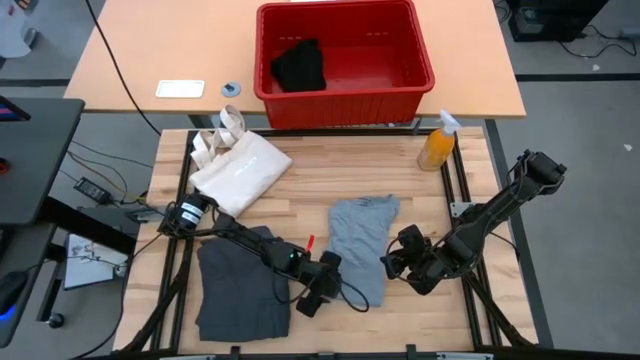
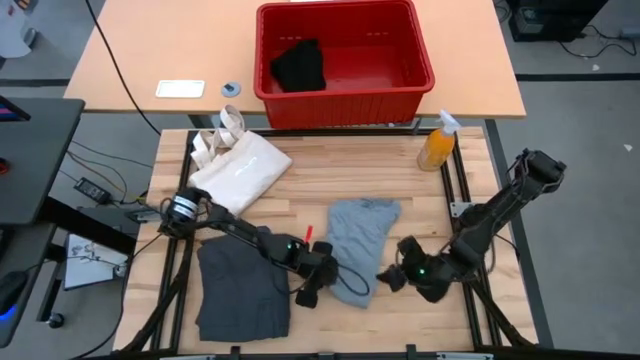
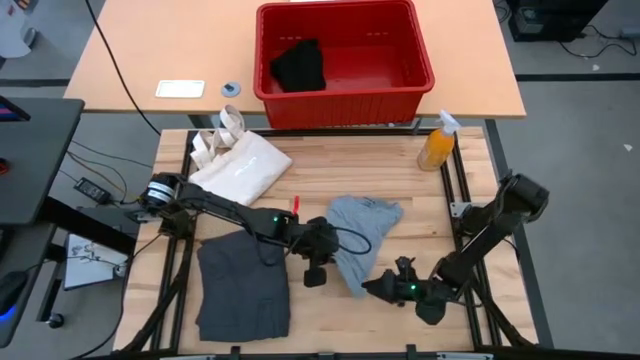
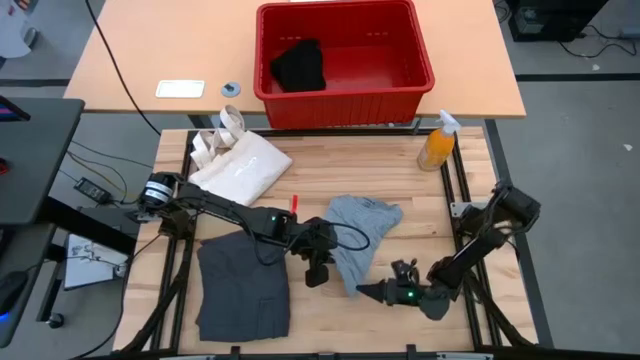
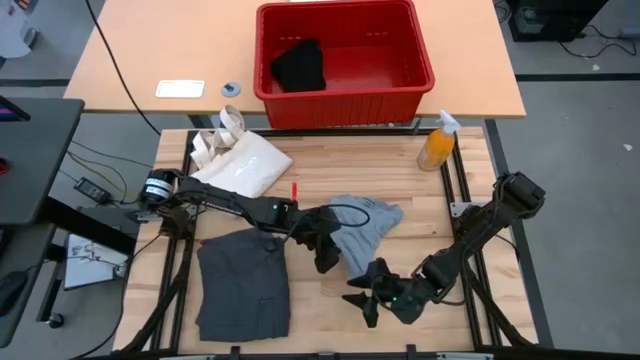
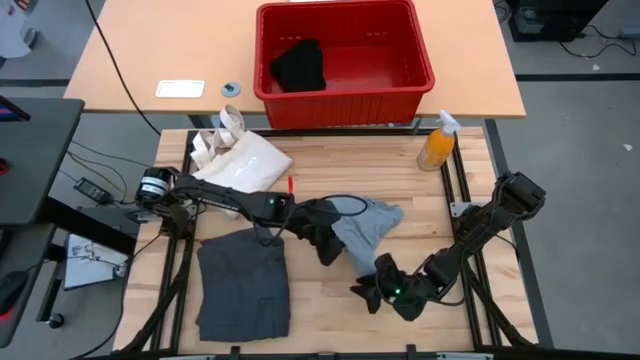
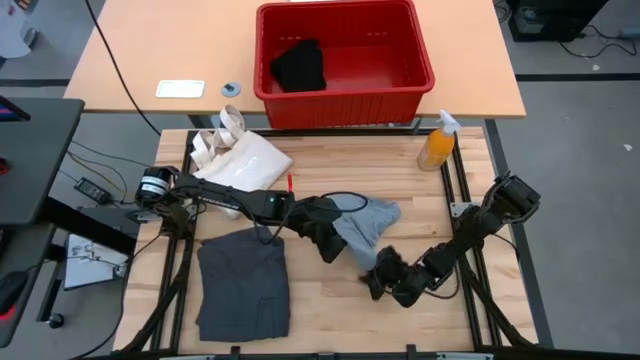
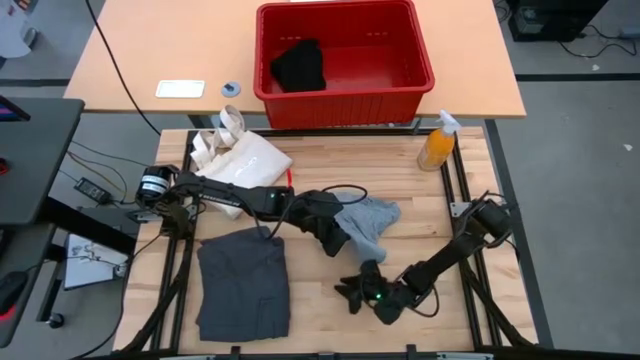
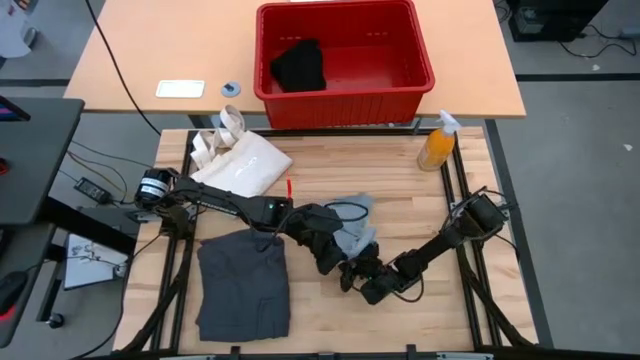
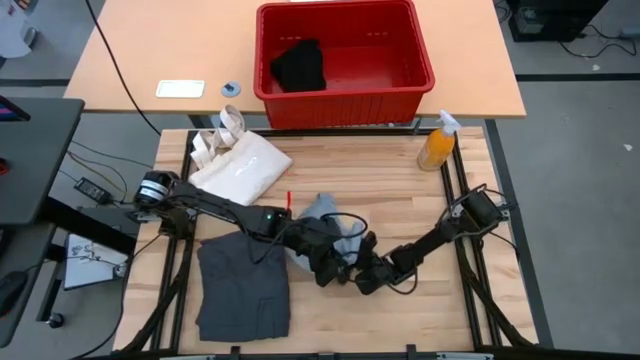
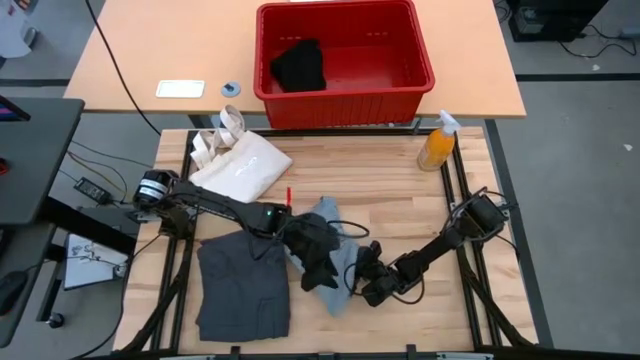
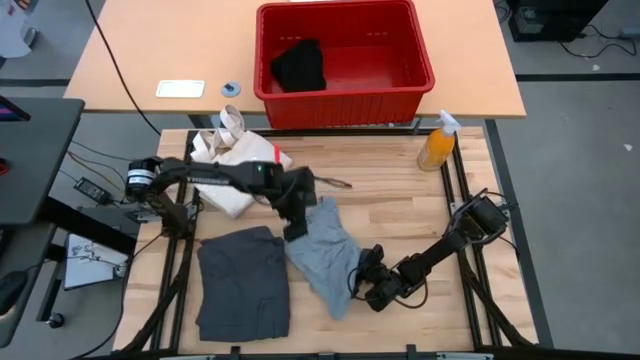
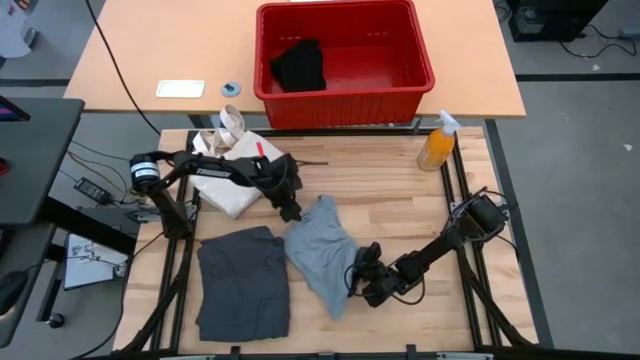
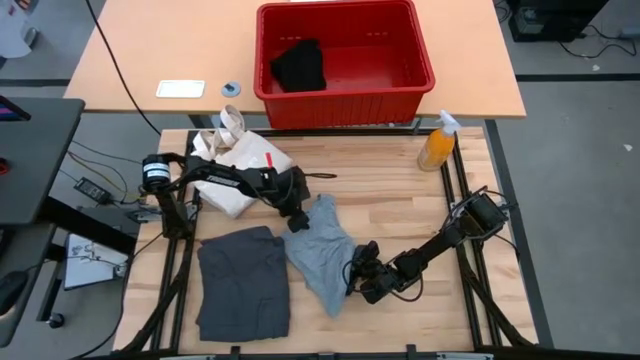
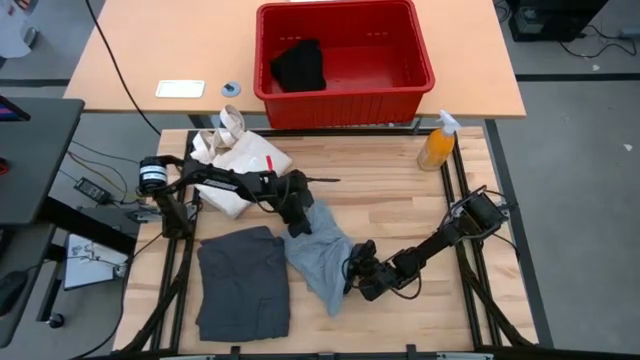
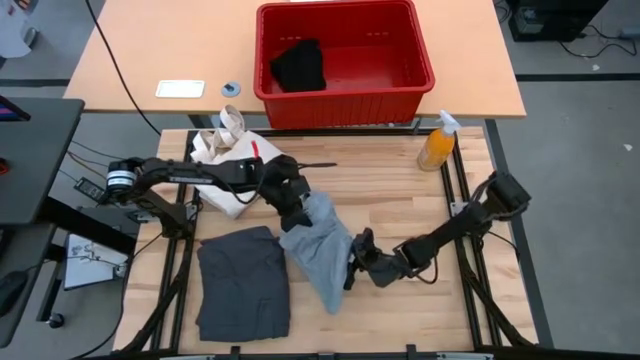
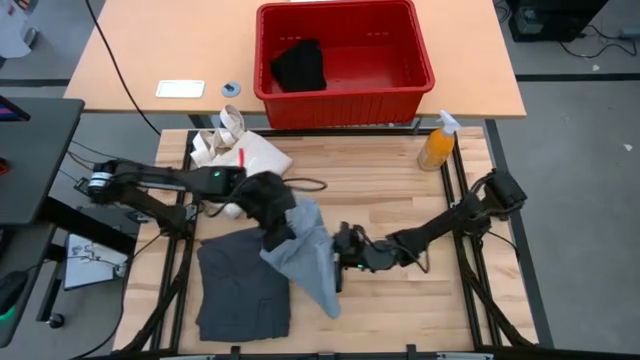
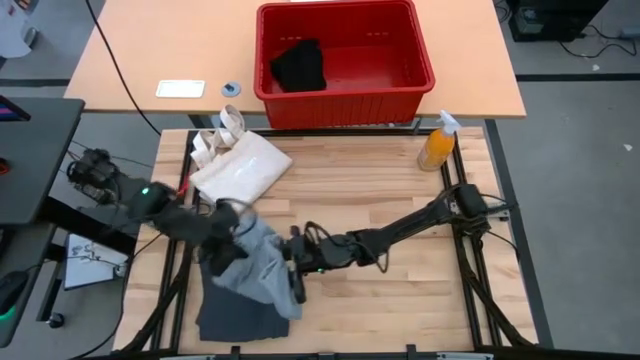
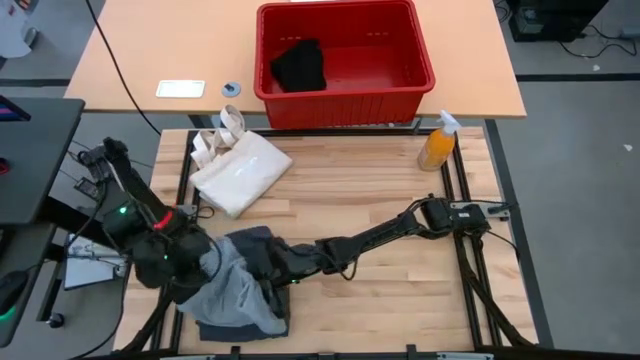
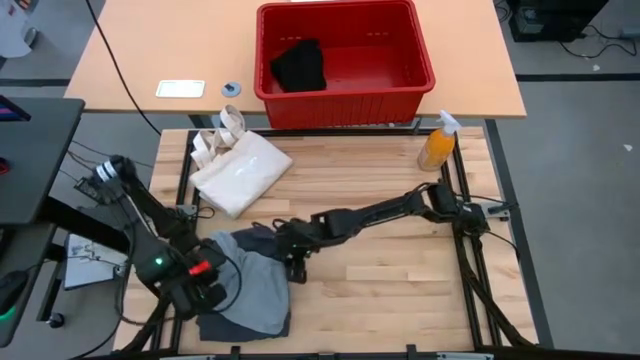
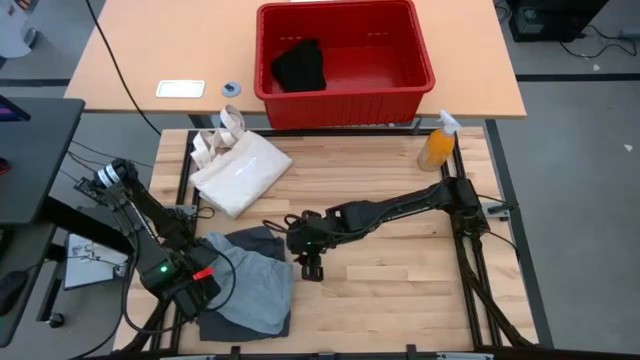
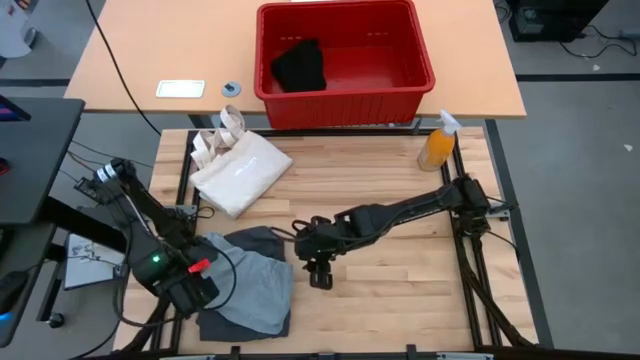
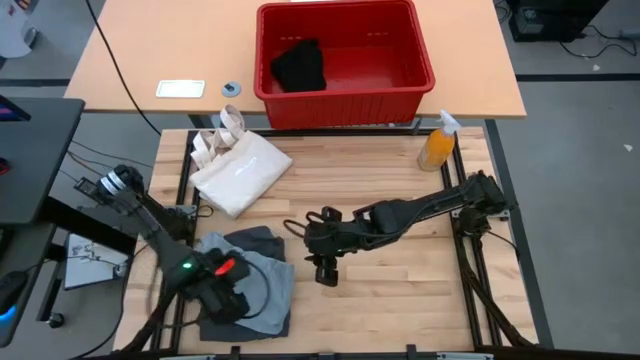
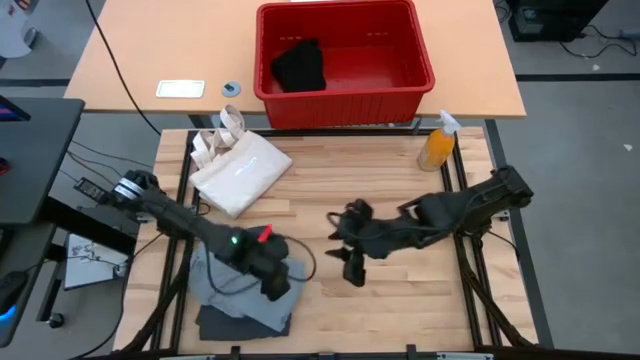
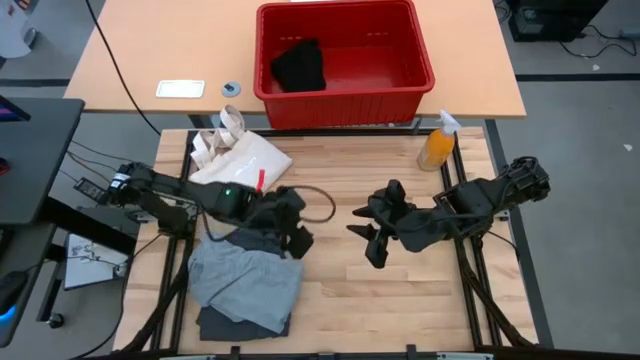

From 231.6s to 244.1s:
Task: Fold Laundry from Bin
Put the light gray t-shirt on top of the pile of clothes

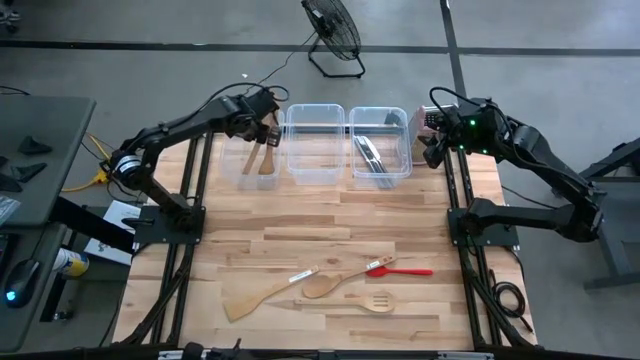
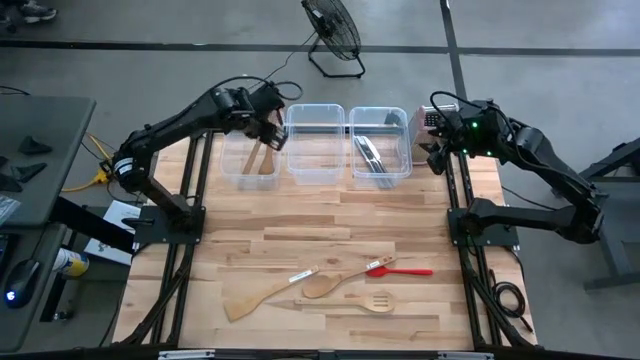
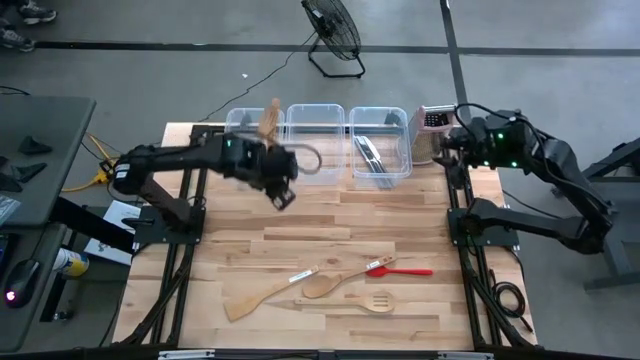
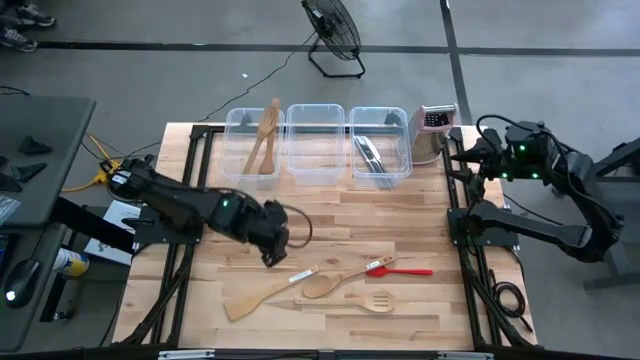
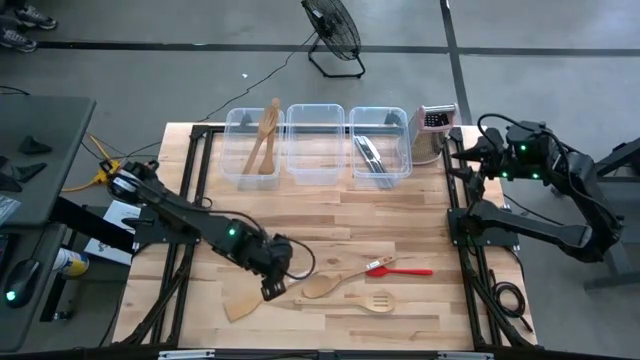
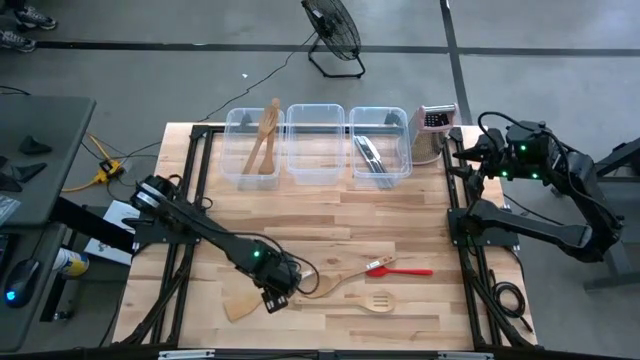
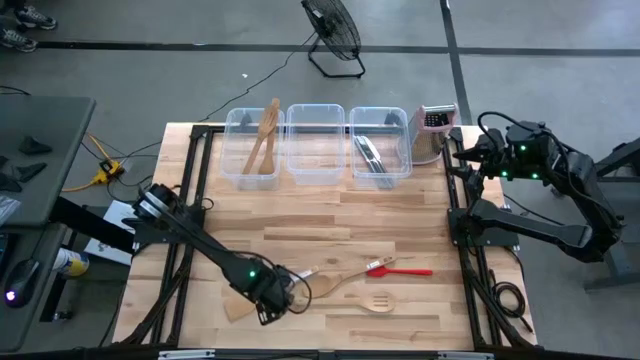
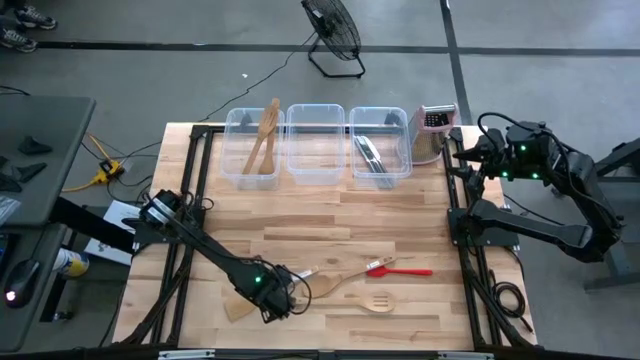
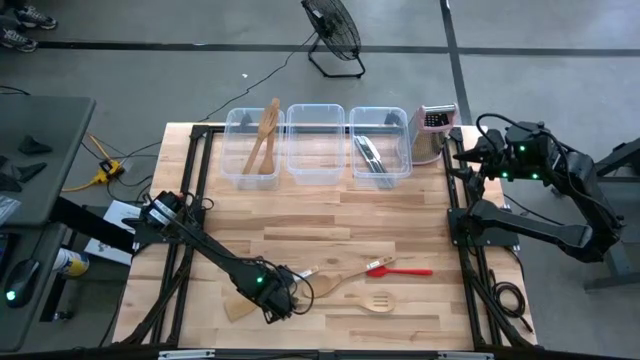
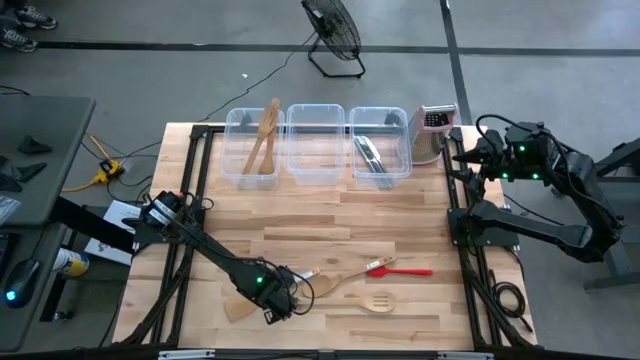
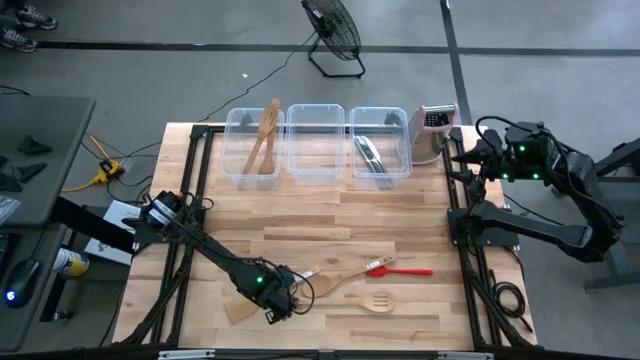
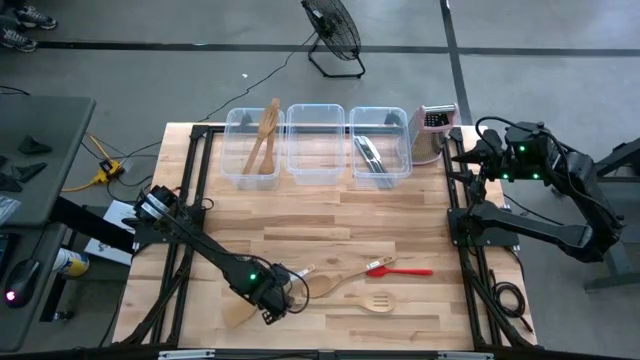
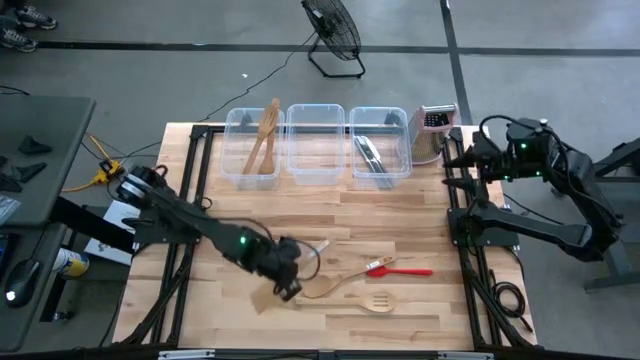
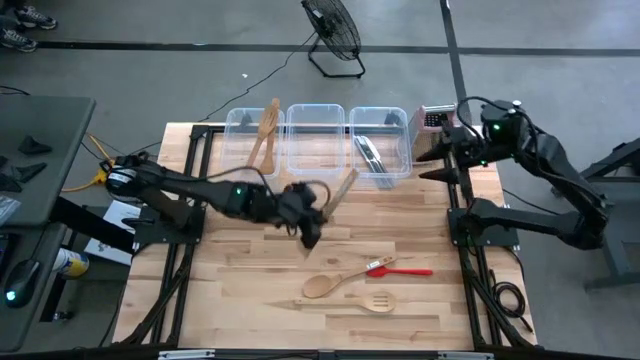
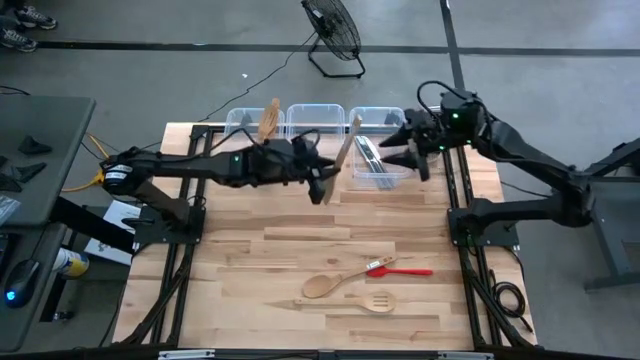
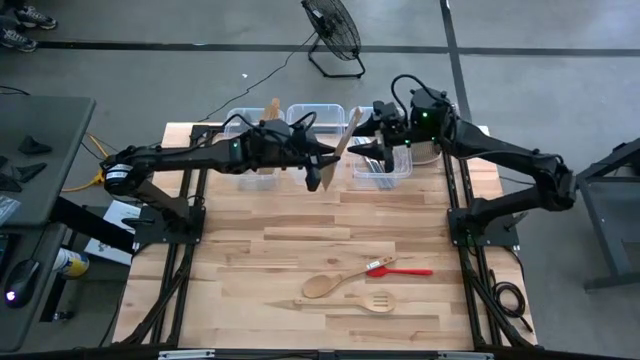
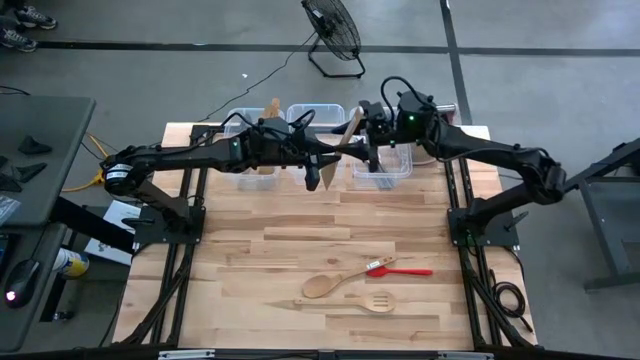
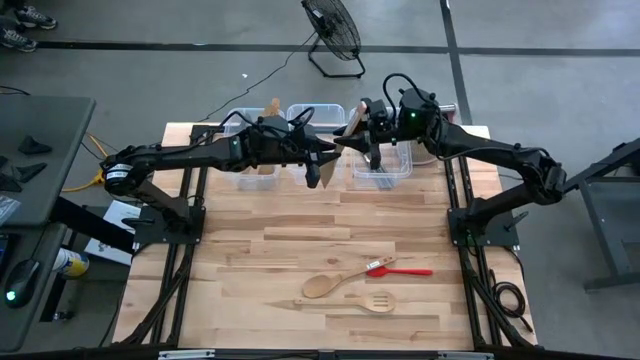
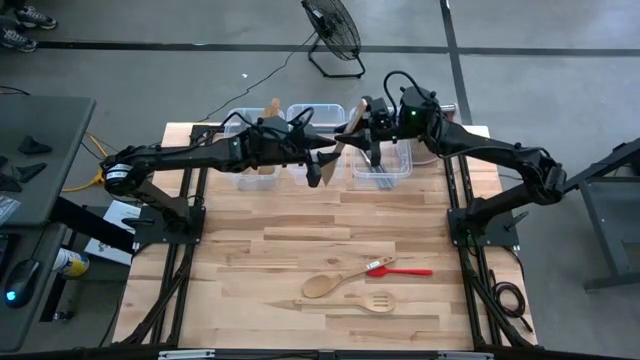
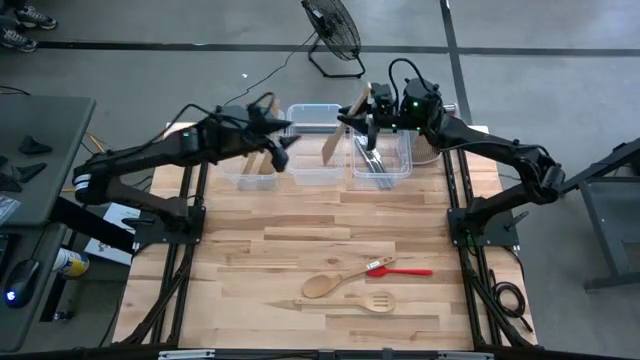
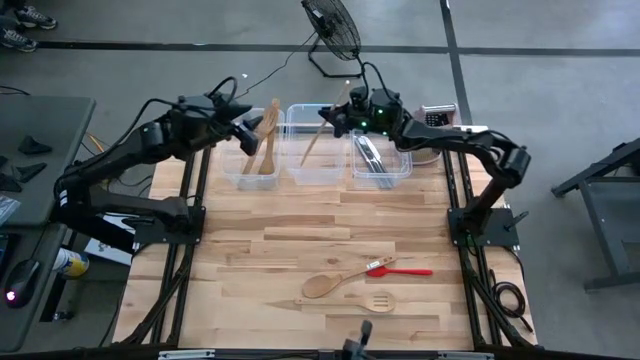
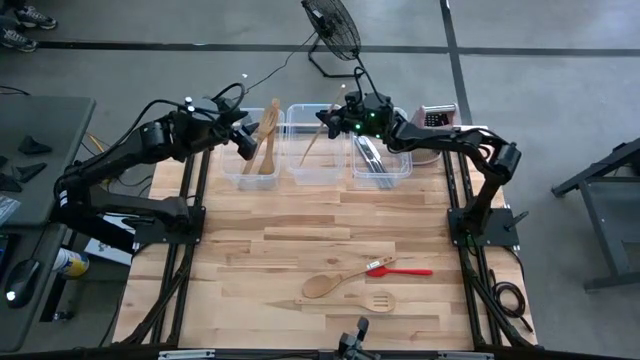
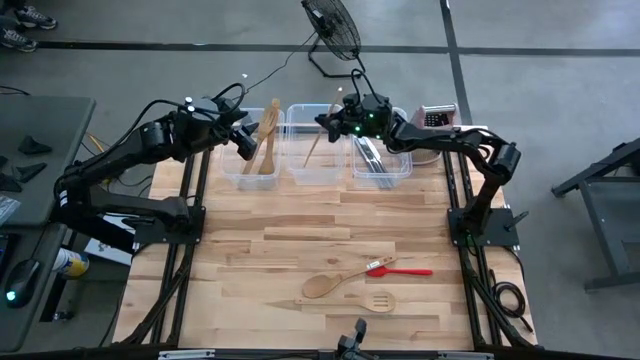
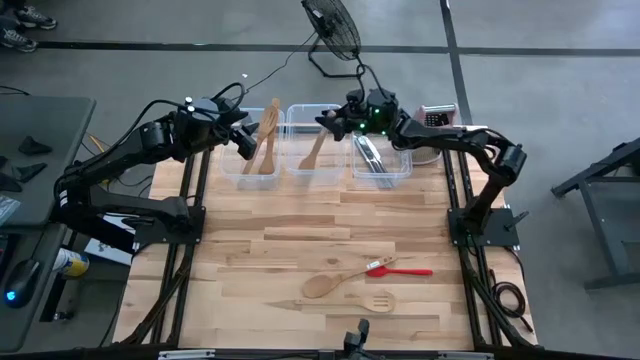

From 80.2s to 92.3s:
Task: Pick & Place Kitchen Items
Put the wooden spatula into the middle transparent bin
